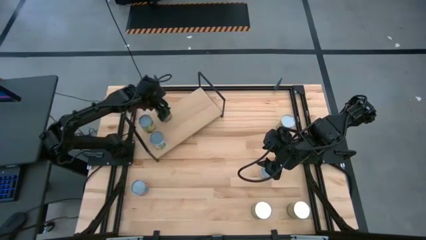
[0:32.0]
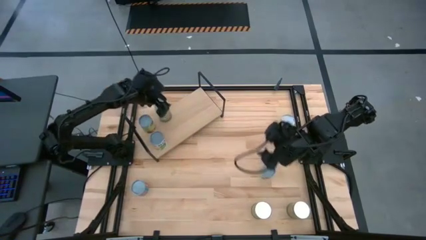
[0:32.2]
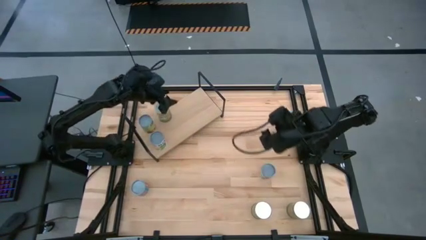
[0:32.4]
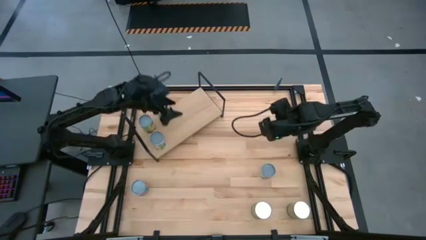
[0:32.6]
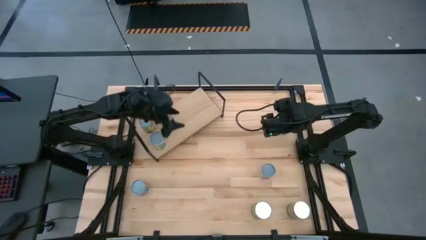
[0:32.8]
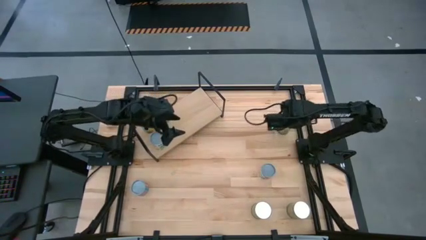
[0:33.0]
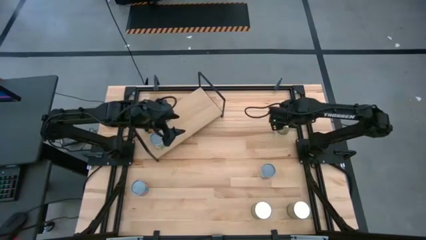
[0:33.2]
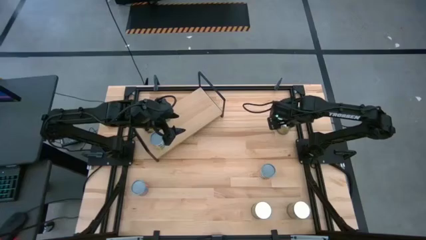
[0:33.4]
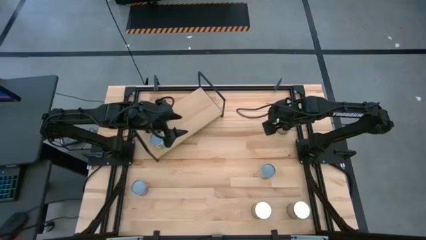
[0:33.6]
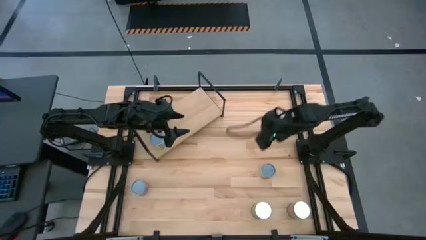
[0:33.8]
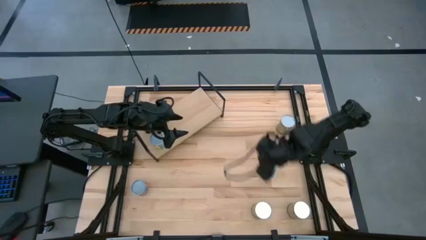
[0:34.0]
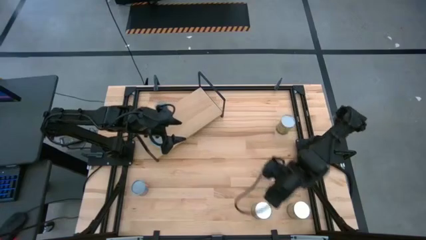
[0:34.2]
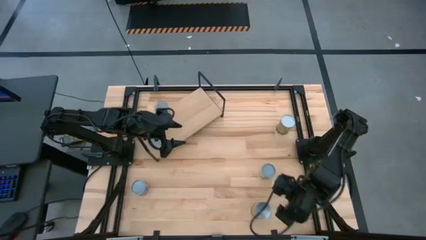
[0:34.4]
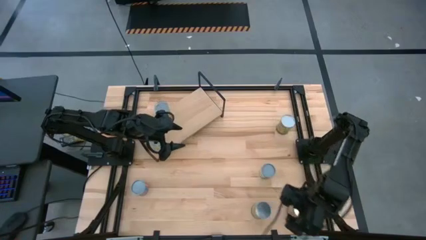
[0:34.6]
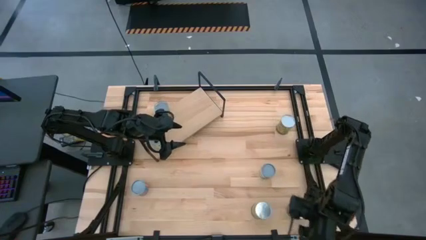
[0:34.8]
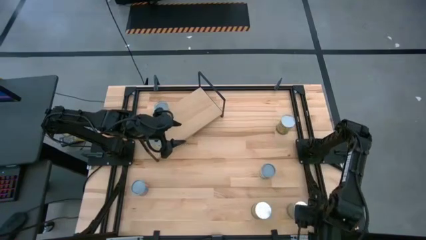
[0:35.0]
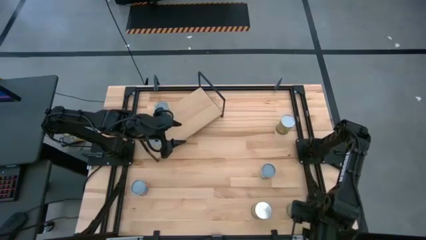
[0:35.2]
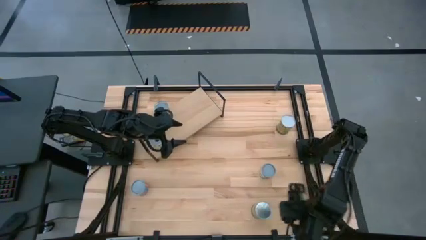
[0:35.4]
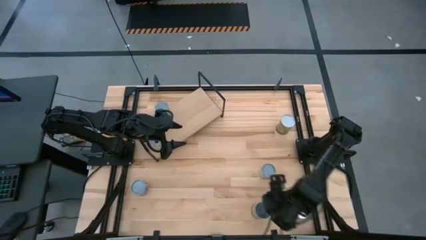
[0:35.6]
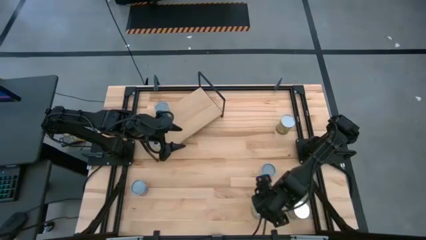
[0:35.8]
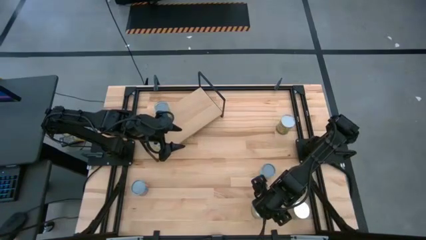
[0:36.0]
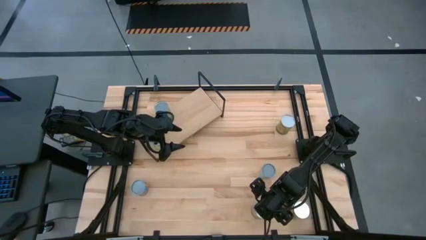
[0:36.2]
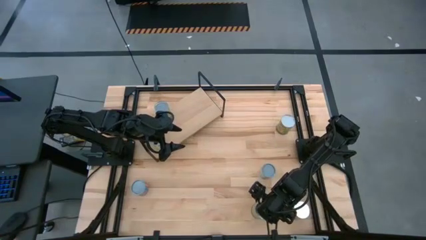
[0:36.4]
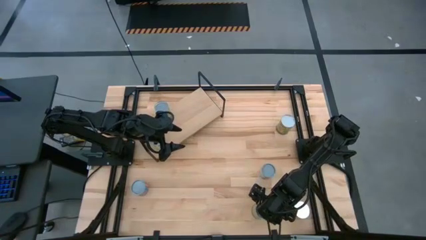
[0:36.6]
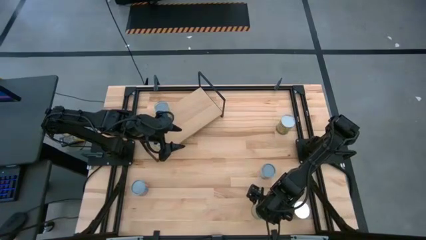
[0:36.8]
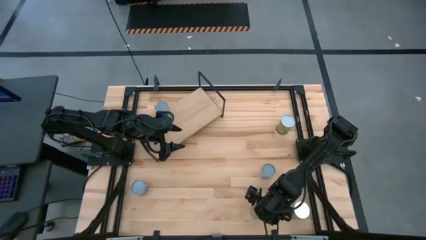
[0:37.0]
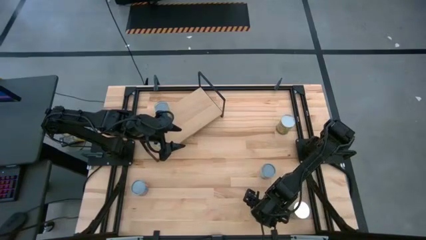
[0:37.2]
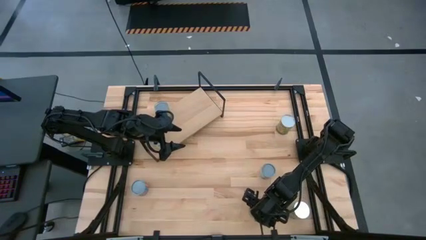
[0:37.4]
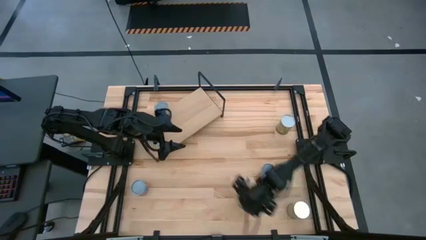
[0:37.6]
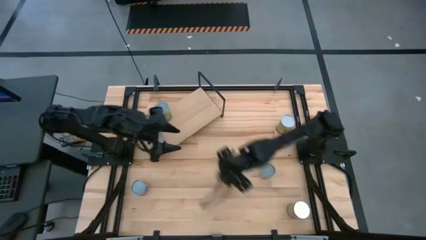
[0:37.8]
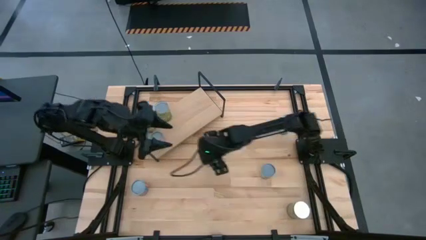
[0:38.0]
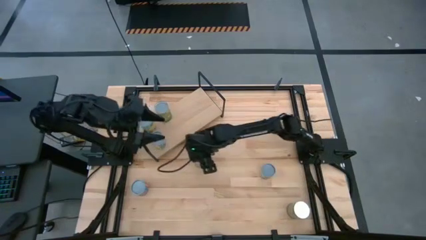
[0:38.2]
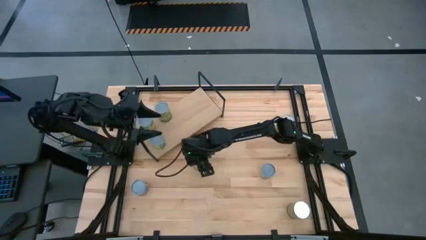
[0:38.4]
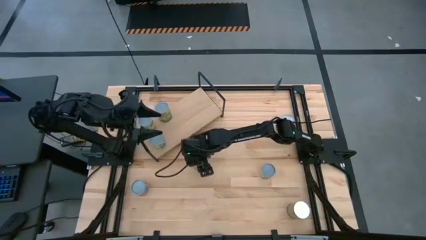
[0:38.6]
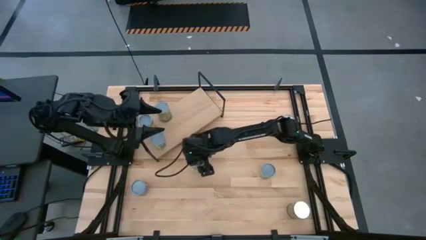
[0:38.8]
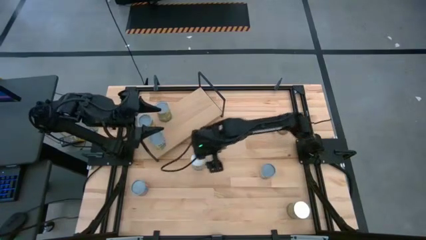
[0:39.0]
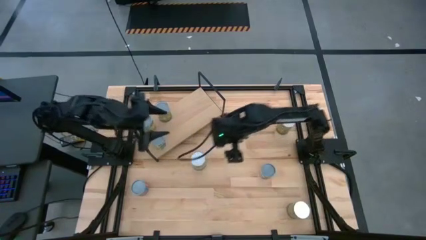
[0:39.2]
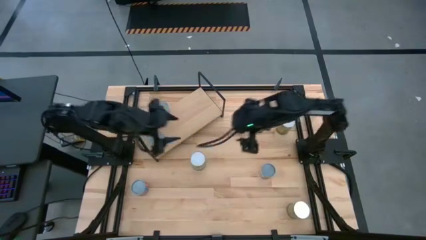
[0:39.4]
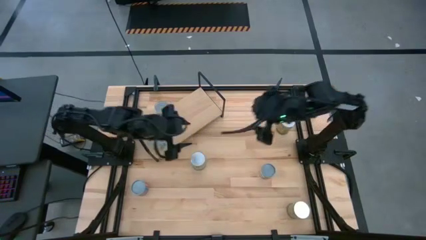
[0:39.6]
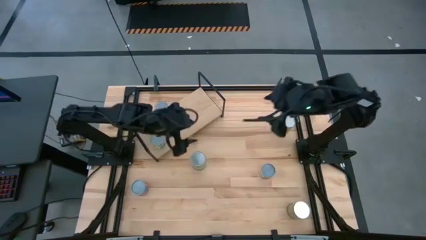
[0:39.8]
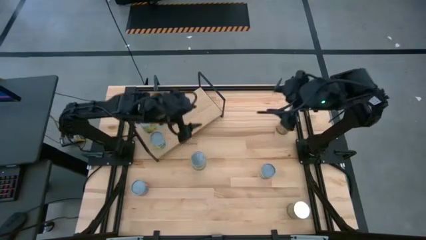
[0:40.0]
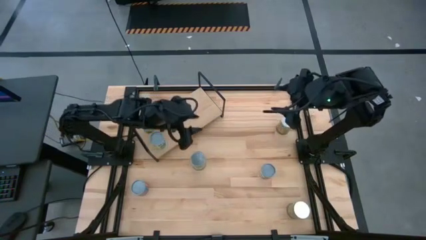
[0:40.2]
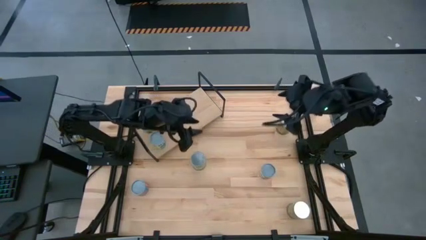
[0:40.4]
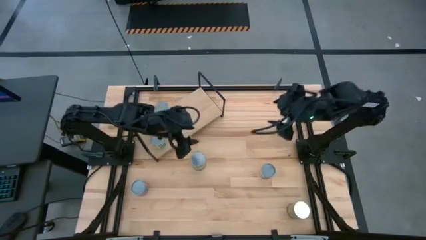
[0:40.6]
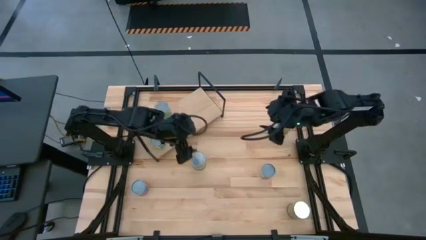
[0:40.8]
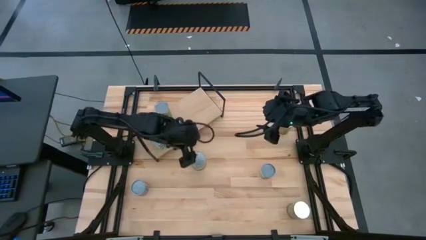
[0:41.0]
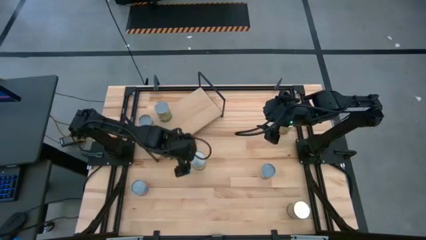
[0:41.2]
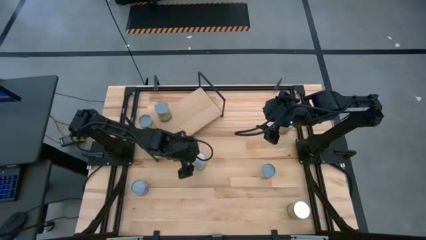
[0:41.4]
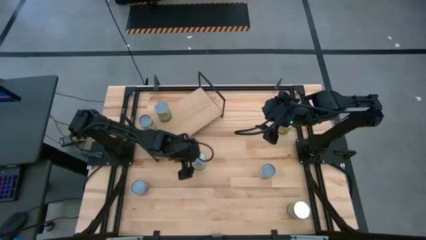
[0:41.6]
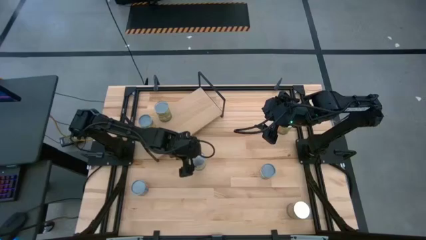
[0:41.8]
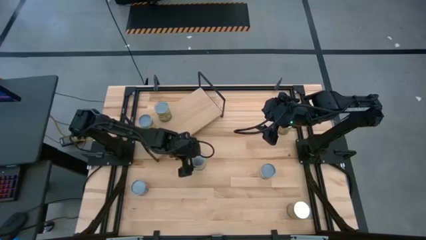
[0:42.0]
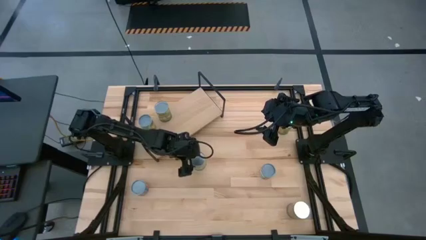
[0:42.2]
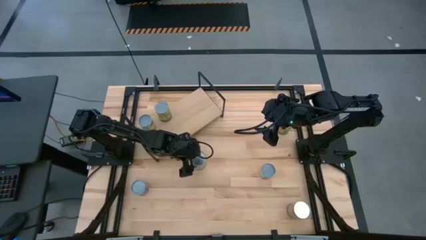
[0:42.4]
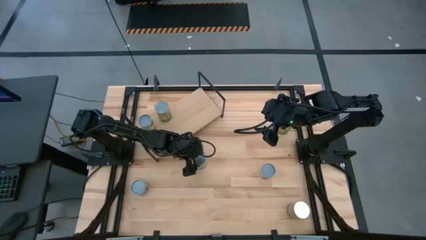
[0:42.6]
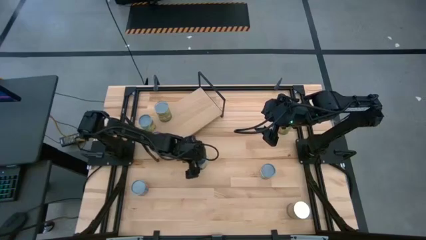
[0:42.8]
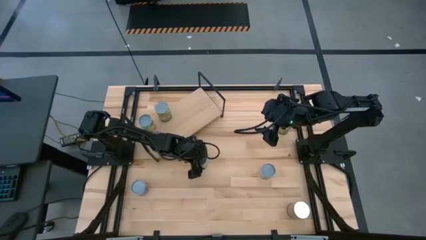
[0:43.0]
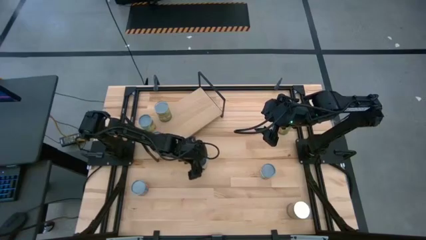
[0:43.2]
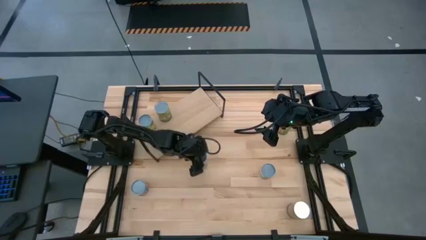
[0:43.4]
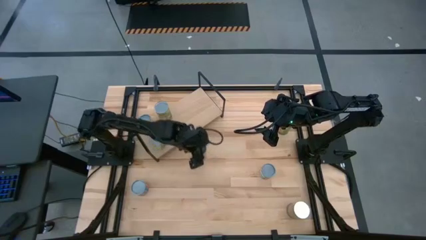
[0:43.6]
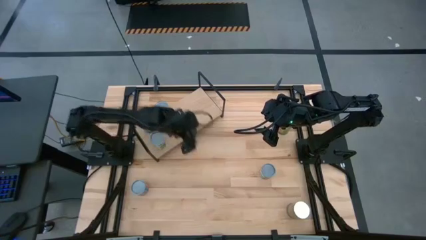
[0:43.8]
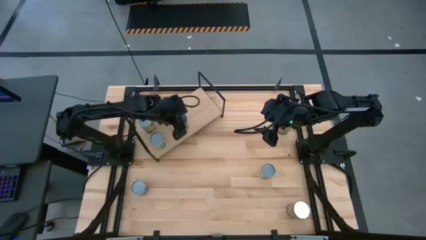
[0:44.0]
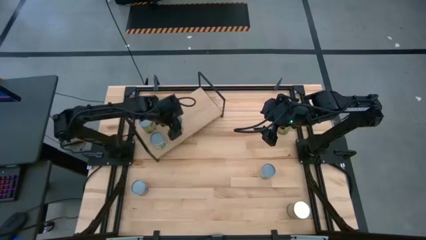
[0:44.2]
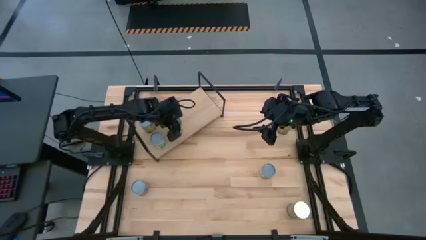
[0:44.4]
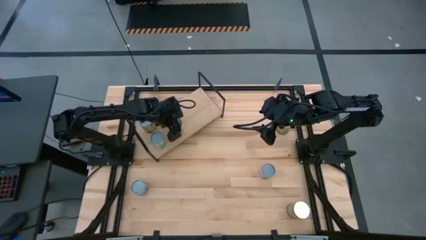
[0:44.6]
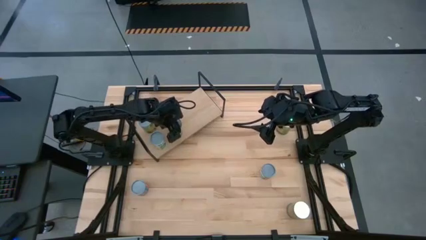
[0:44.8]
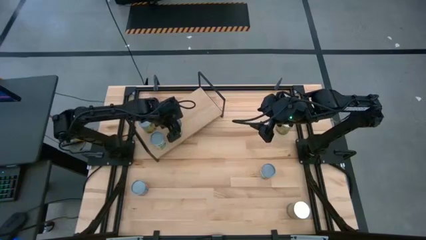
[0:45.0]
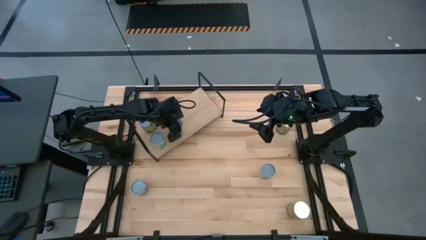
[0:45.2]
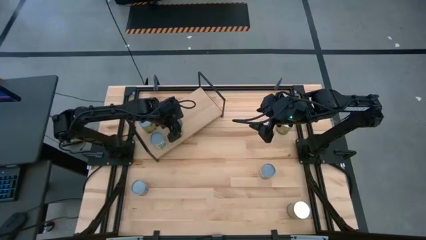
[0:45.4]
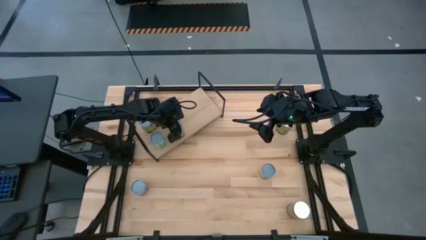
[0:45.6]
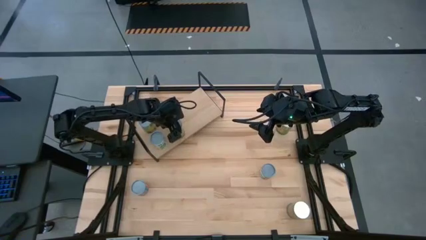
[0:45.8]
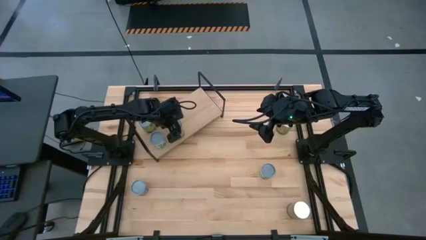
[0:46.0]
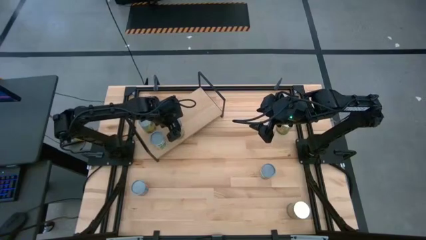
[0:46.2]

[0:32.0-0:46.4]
Task: Pick and place cans onto a shelf
Put the canned pears on the shelf
